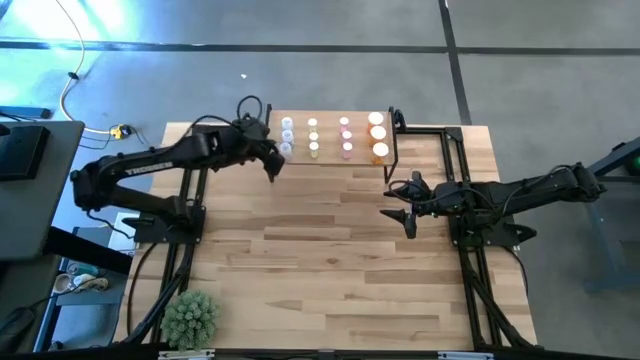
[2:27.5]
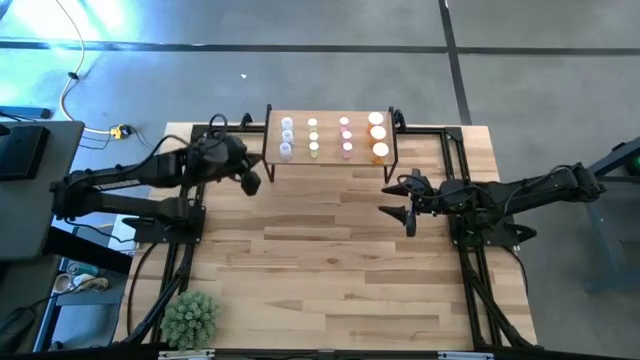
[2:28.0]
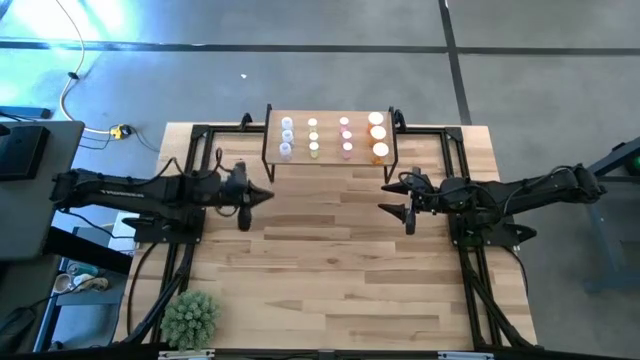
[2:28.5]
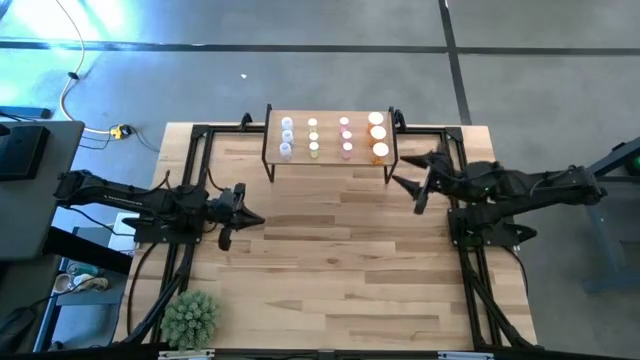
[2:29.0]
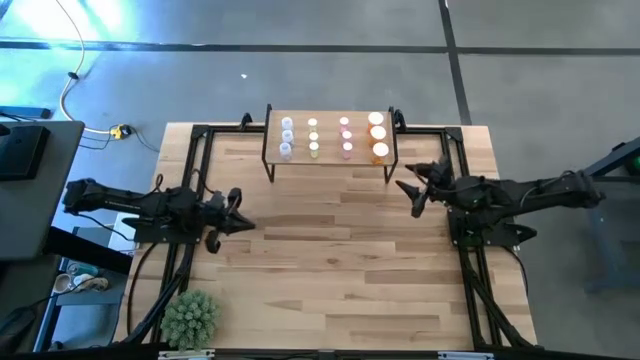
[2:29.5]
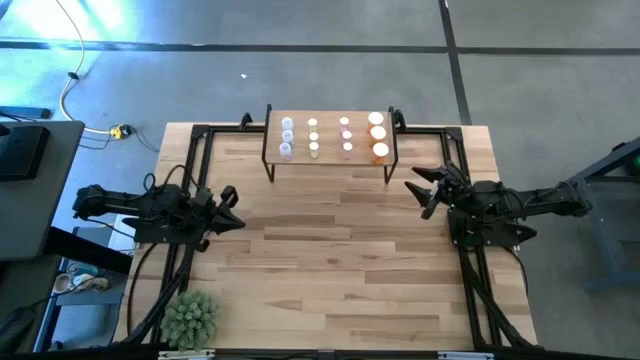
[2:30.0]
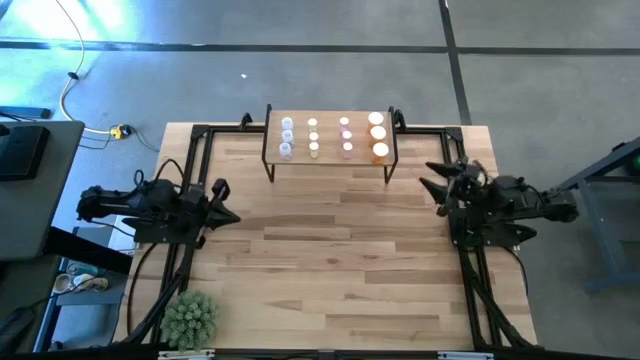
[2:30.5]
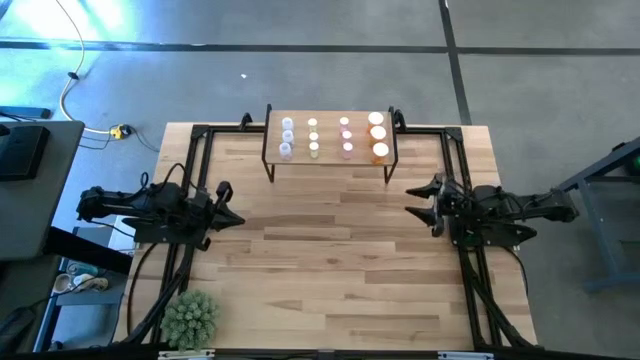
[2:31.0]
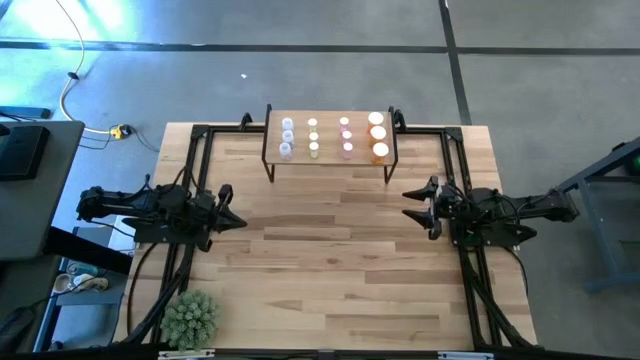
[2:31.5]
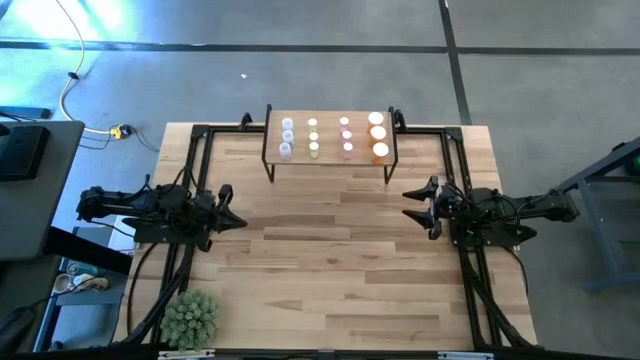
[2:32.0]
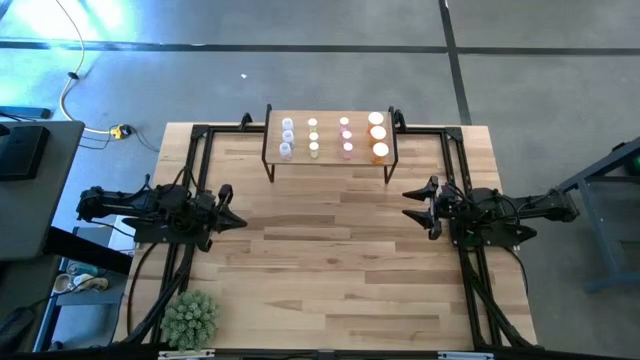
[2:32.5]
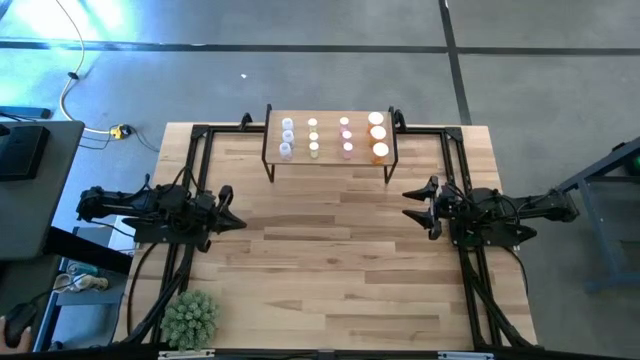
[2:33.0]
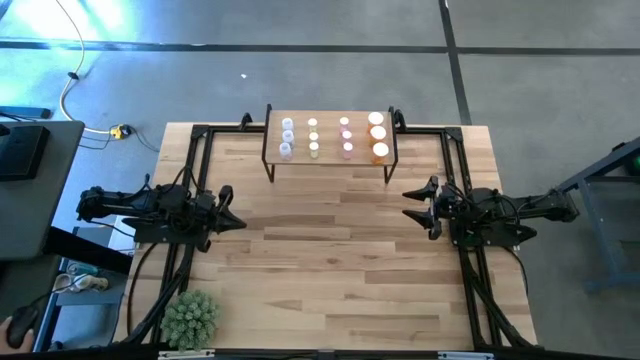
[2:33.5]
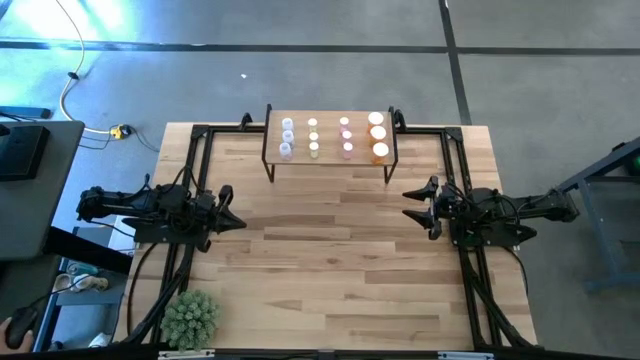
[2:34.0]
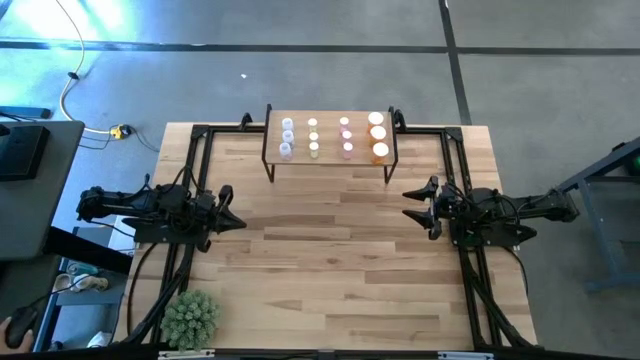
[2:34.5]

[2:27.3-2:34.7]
Task: Pick and place medicine bottles onto shelf by color
Return to Home Position

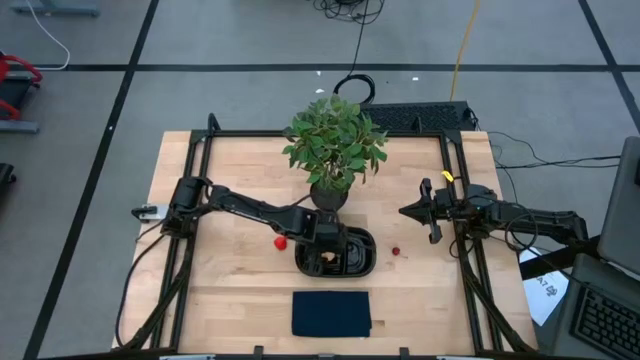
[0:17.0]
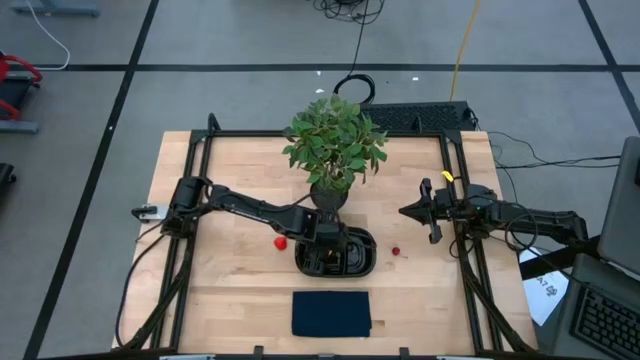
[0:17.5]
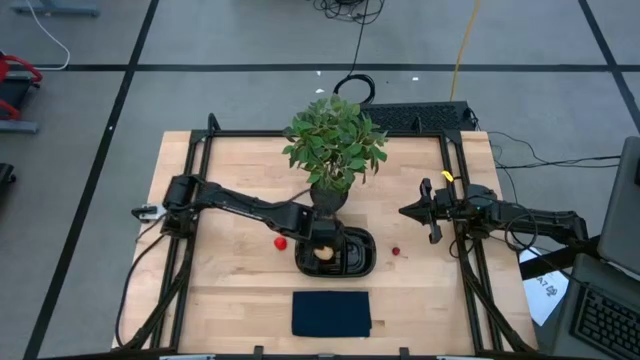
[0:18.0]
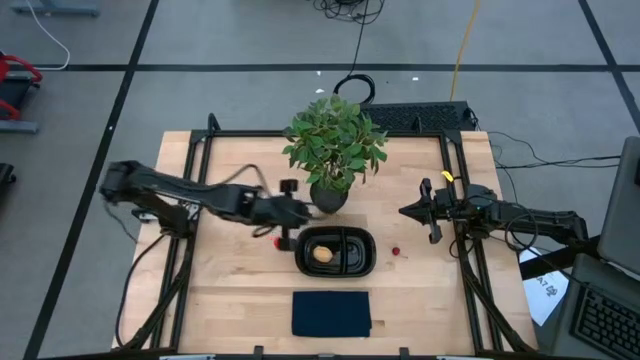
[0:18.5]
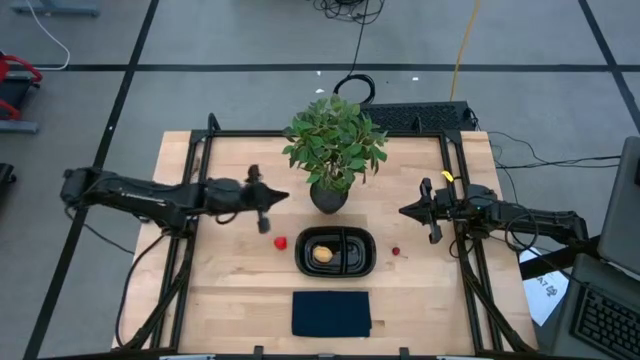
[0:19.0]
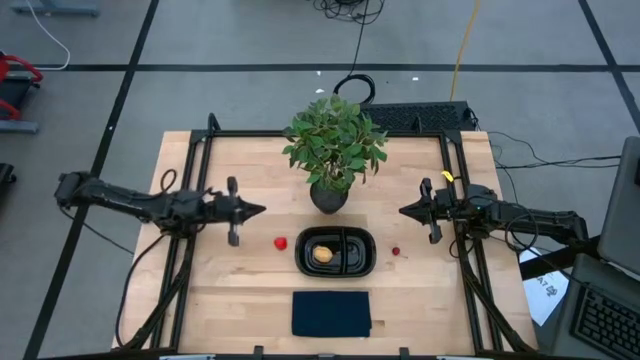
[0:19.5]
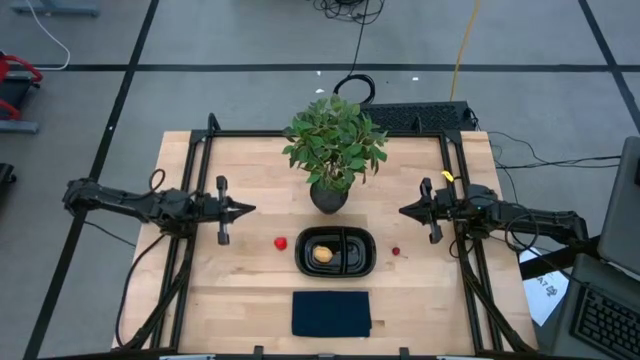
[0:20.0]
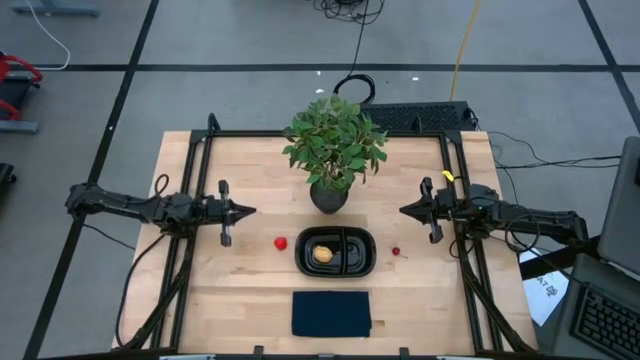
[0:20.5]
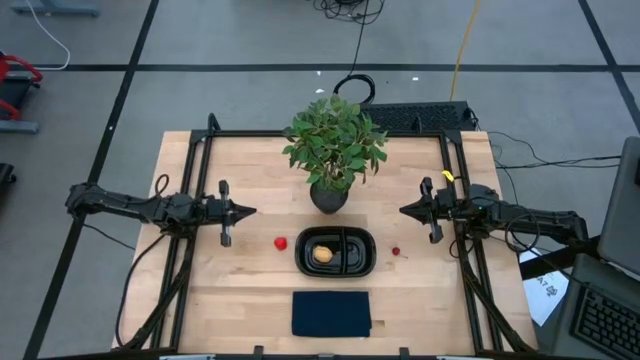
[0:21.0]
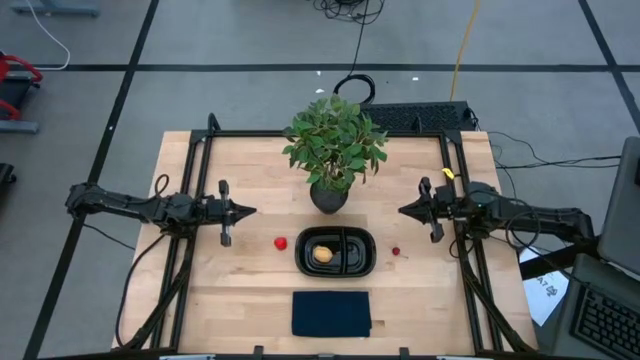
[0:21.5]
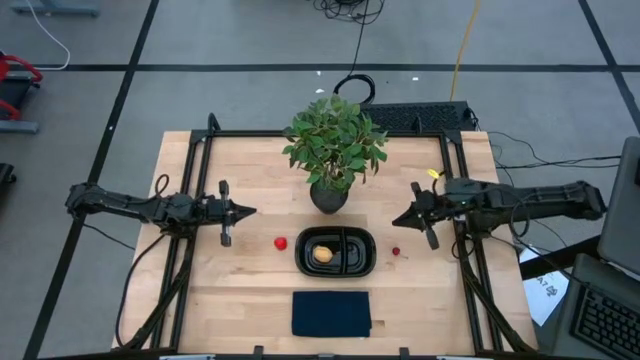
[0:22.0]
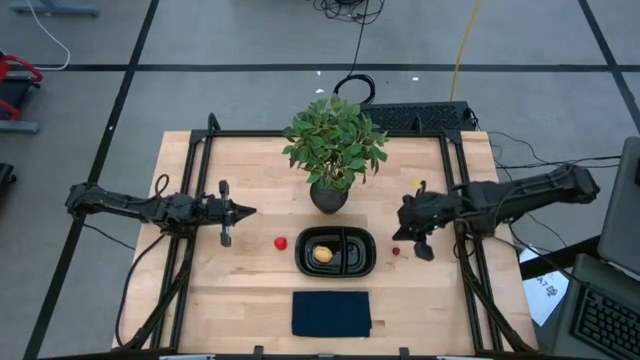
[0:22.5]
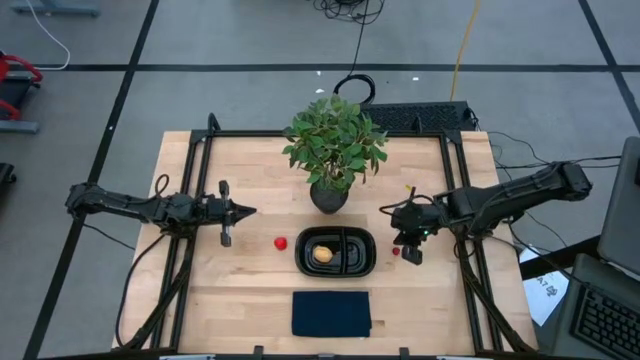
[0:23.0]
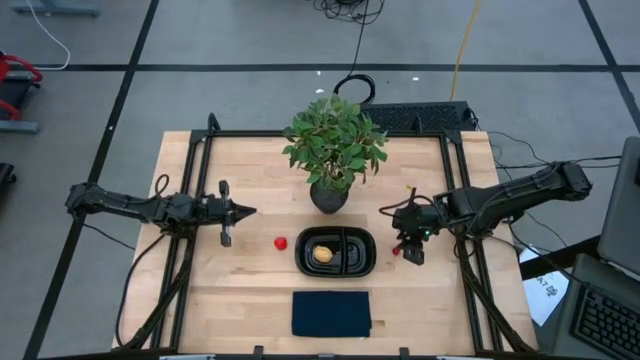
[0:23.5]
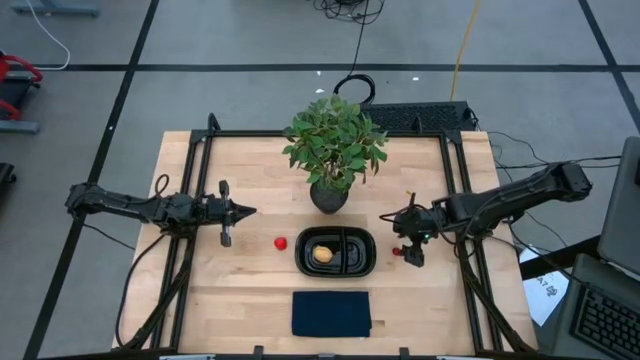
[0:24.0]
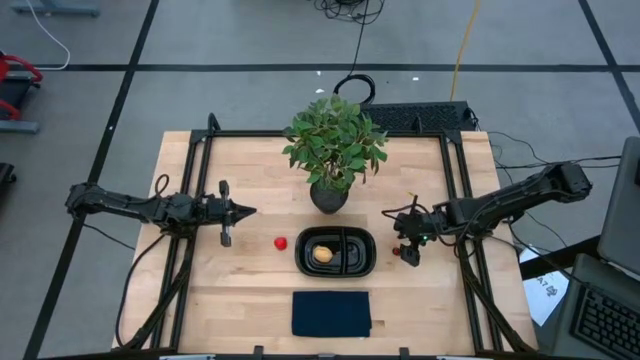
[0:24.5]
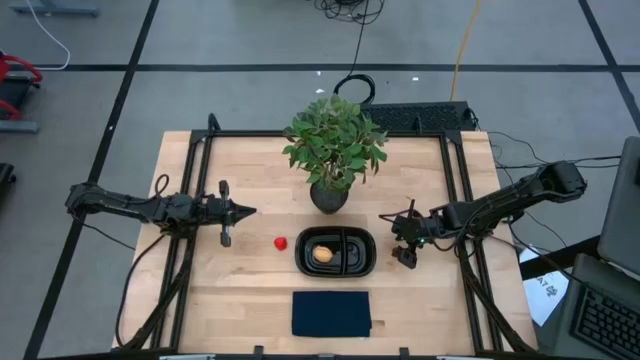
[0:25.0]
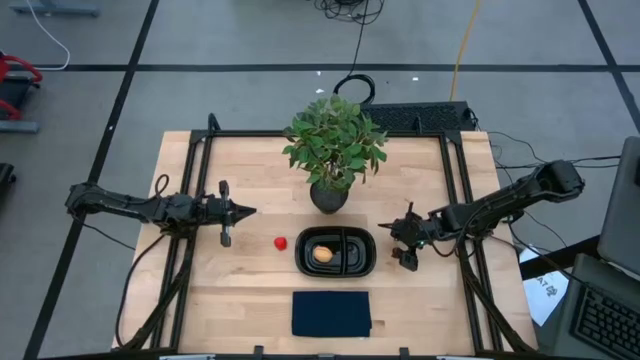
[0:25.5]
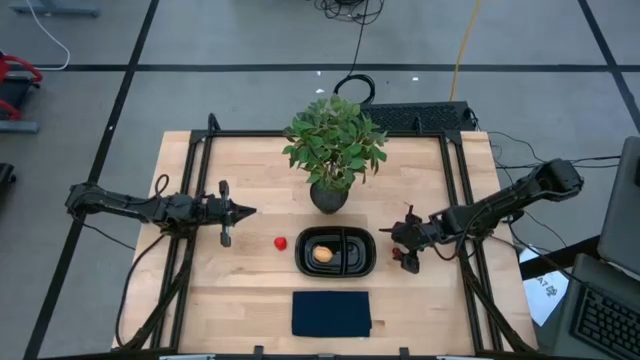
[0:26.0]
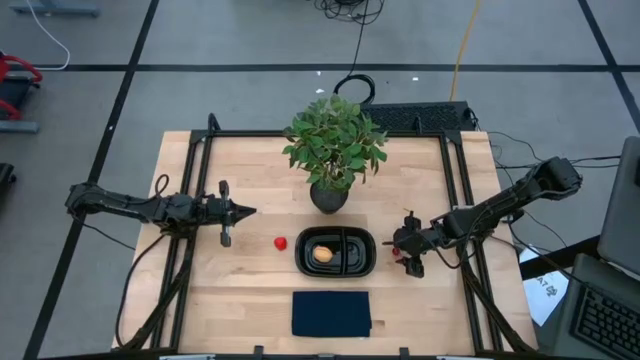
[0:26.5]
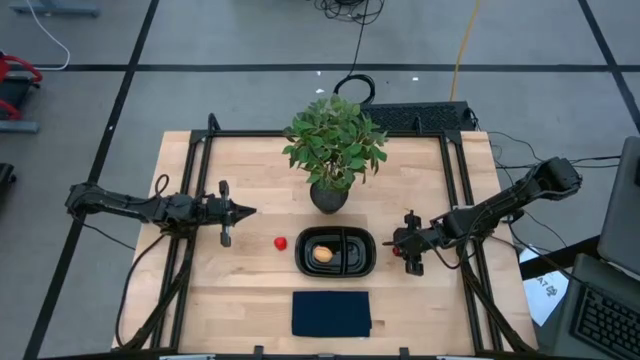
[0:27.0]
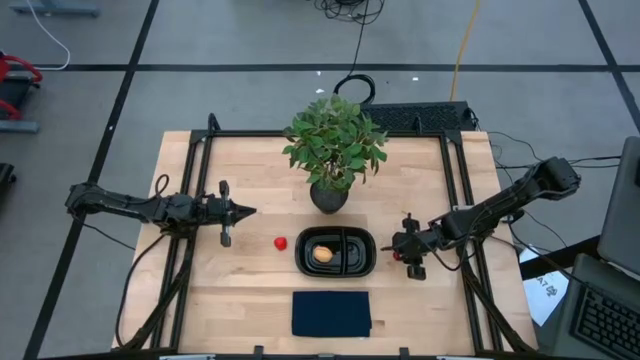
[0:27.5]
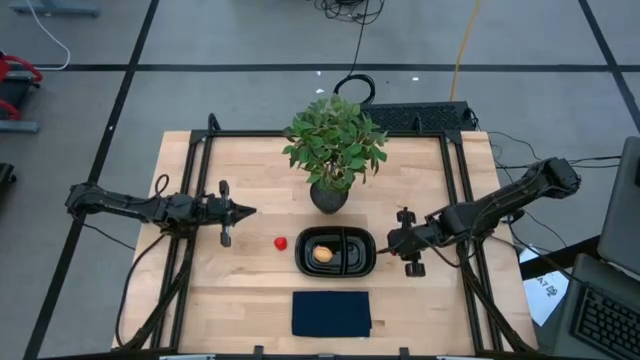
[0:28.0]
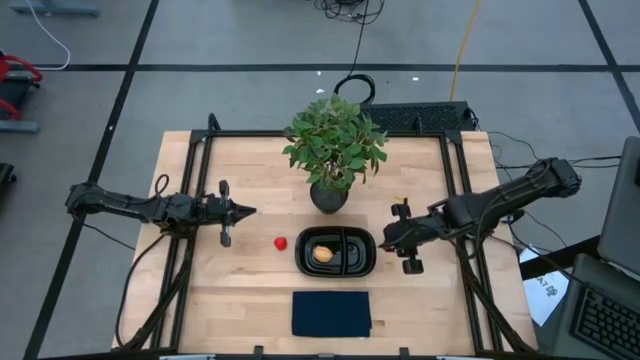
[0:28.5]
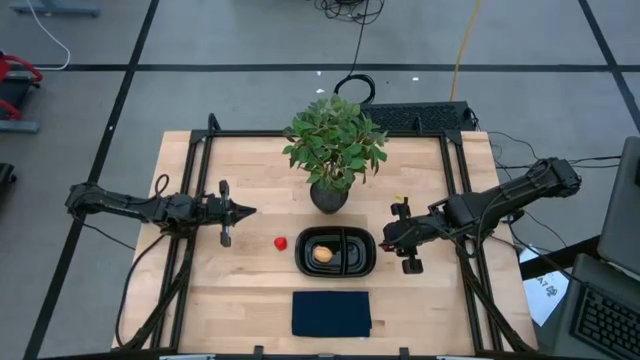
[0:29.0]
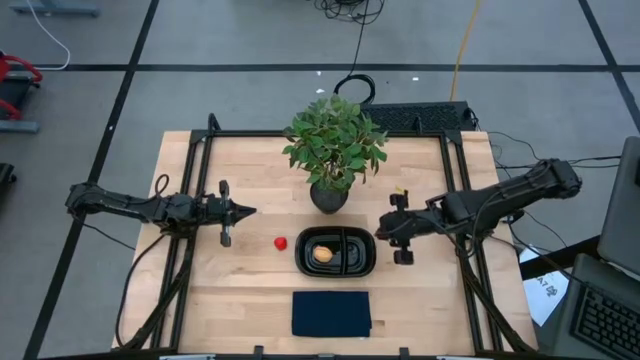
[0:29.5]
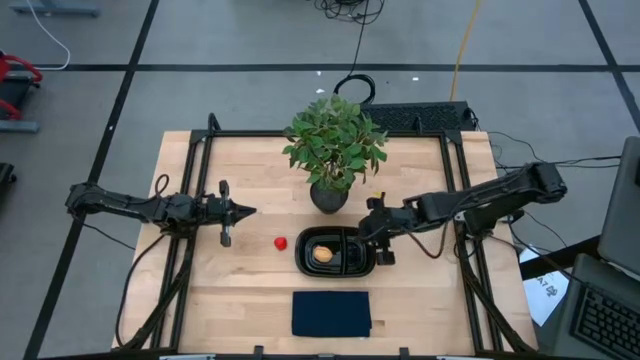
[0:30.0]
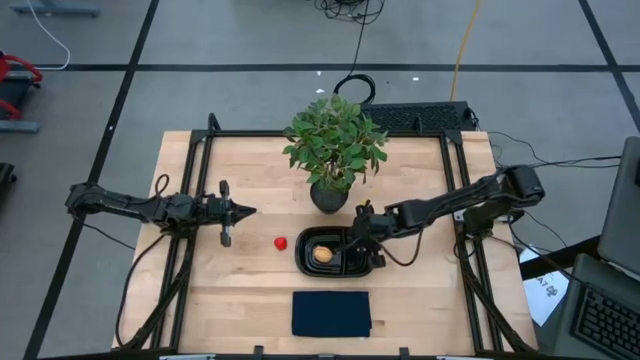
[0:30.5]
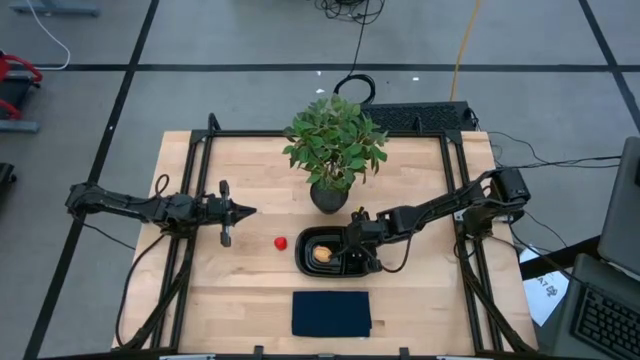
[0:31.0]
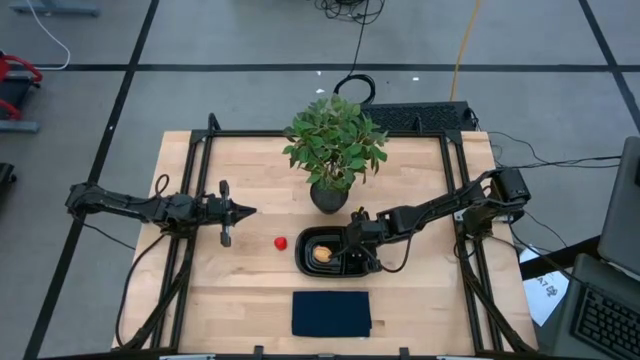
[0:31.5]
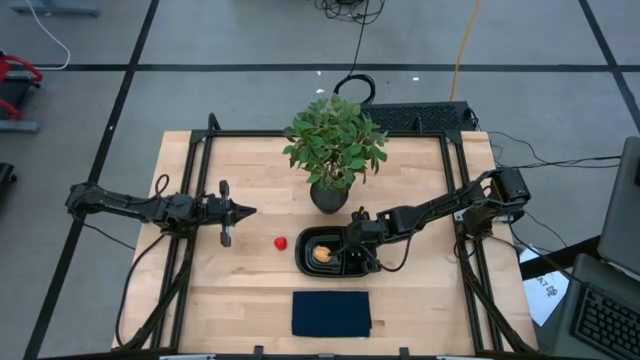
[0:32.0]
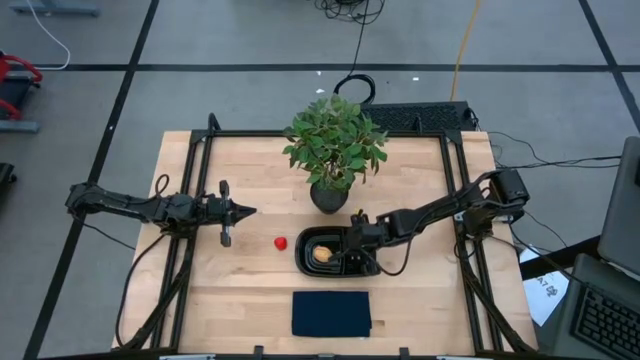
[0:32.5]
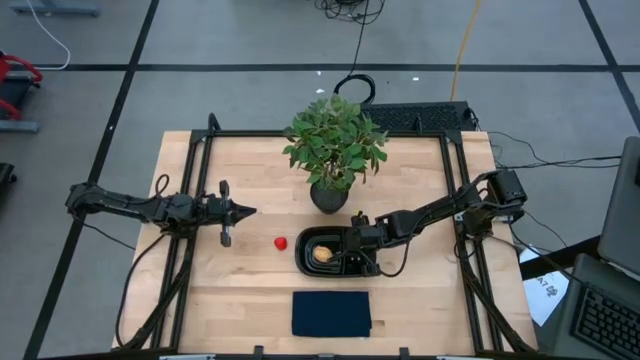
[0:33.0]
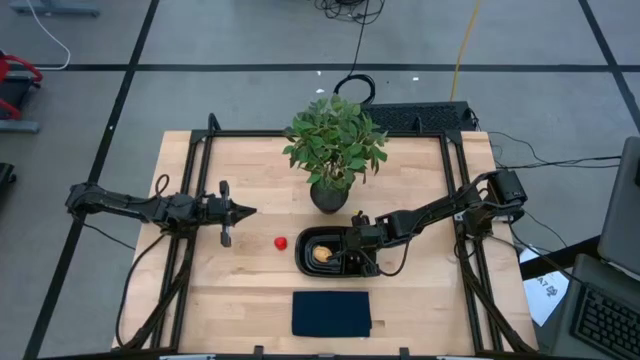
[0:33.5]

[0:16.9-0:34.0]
Task: Pick and placing Produce into tupperware
Put the red cherry into the black container
